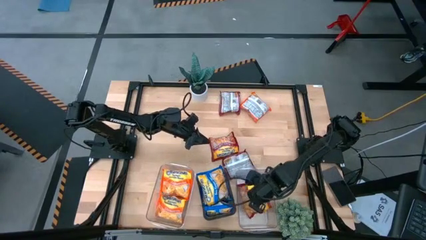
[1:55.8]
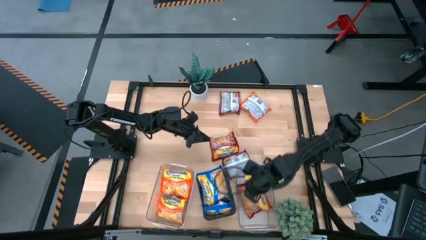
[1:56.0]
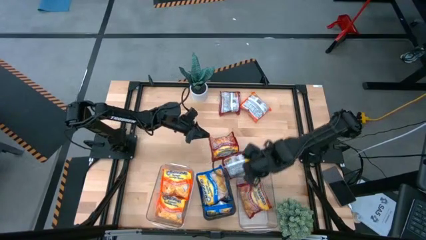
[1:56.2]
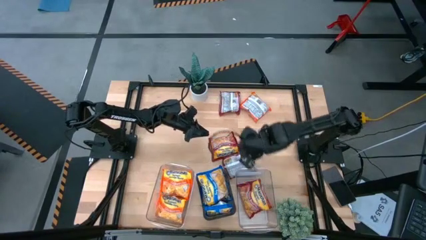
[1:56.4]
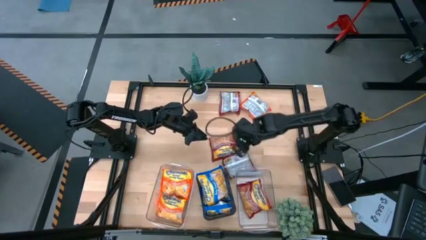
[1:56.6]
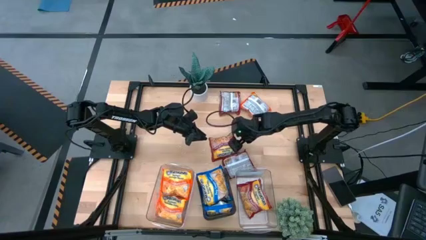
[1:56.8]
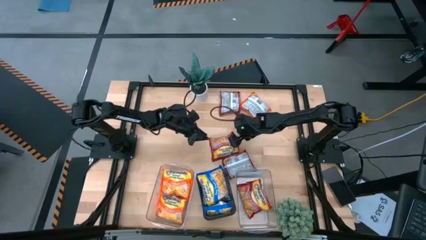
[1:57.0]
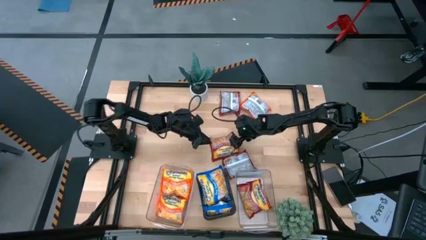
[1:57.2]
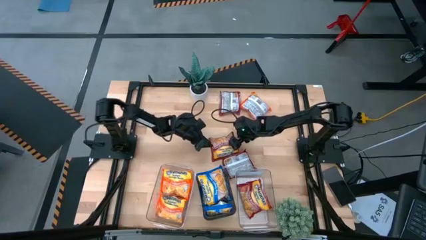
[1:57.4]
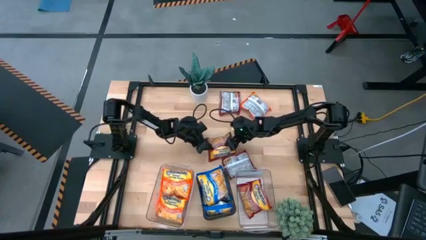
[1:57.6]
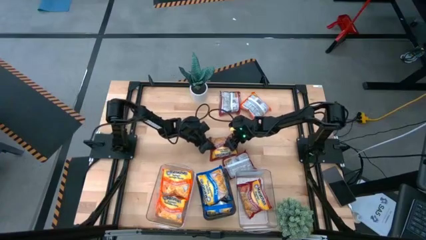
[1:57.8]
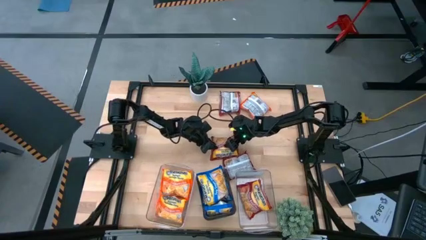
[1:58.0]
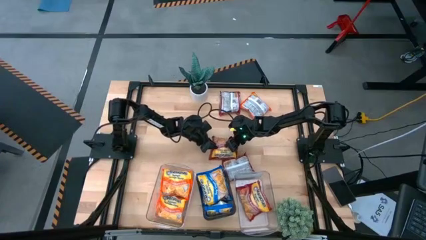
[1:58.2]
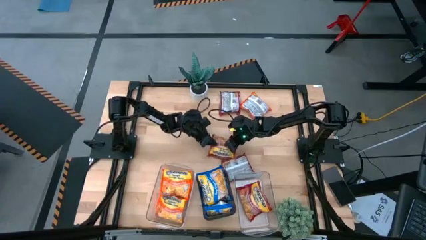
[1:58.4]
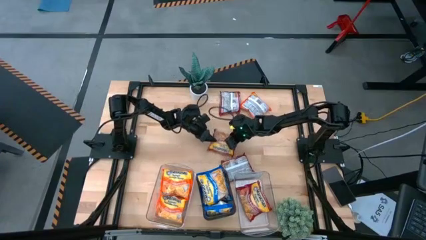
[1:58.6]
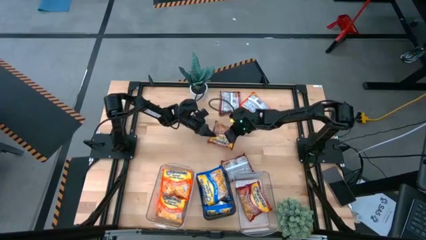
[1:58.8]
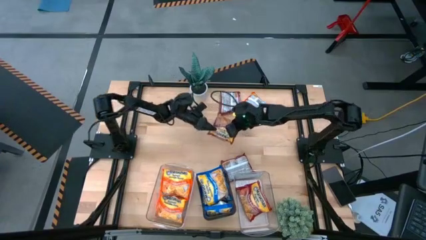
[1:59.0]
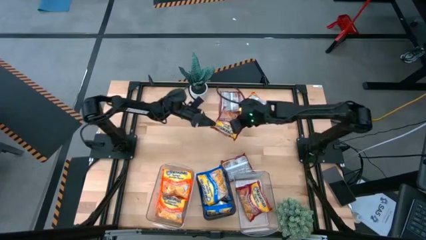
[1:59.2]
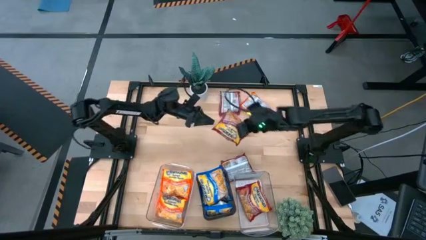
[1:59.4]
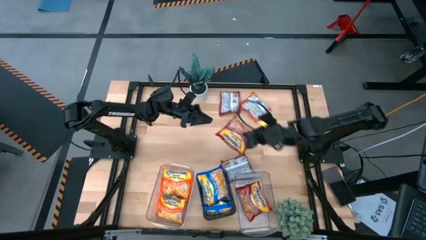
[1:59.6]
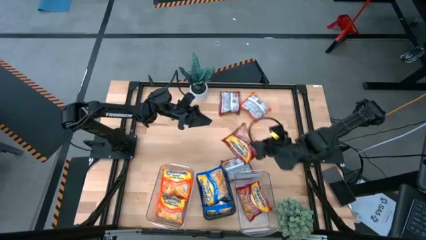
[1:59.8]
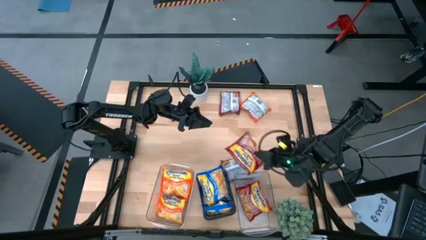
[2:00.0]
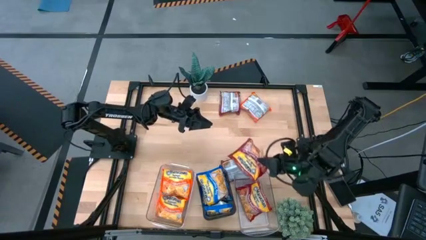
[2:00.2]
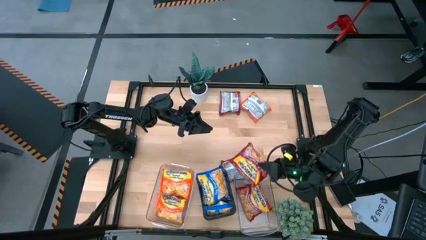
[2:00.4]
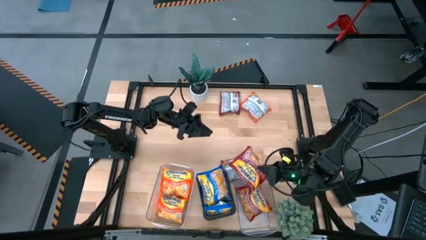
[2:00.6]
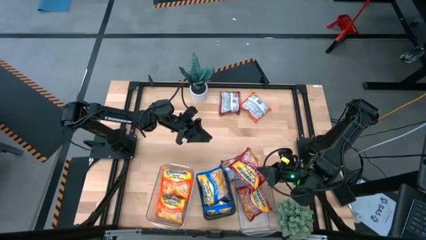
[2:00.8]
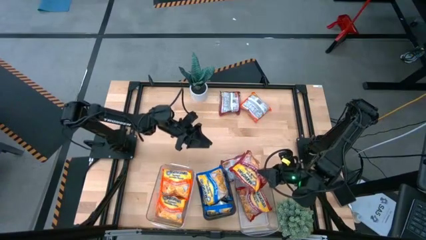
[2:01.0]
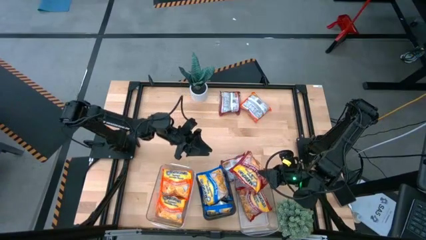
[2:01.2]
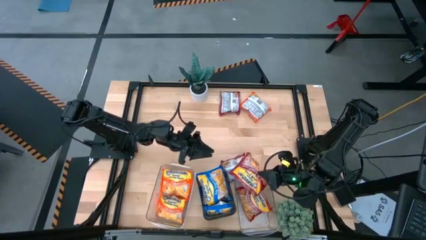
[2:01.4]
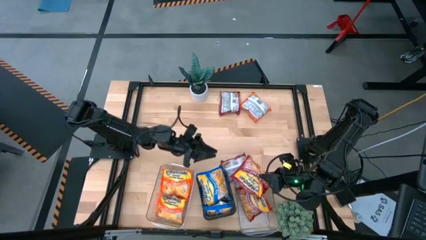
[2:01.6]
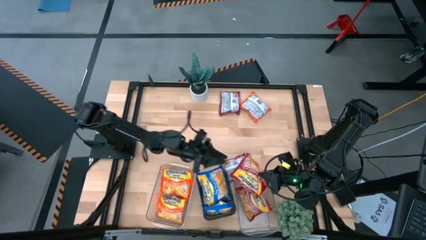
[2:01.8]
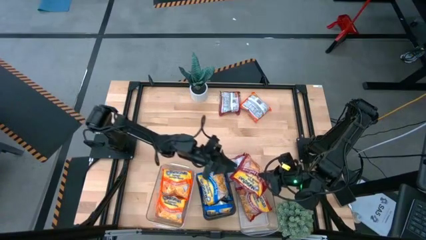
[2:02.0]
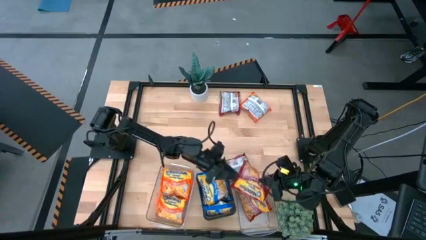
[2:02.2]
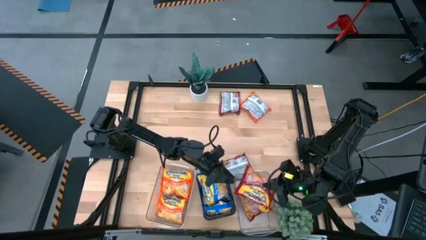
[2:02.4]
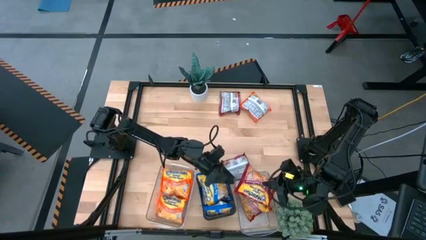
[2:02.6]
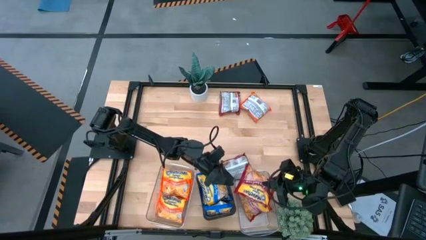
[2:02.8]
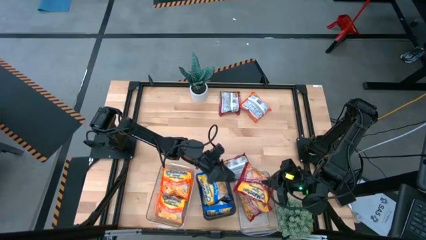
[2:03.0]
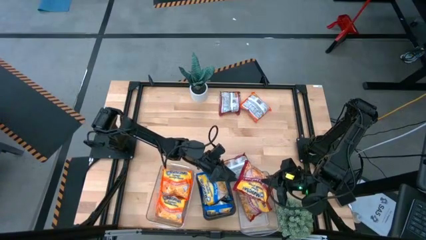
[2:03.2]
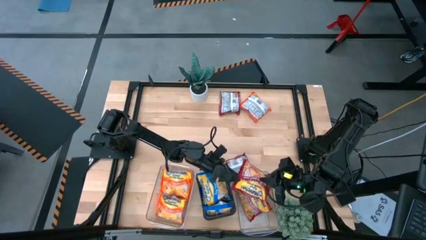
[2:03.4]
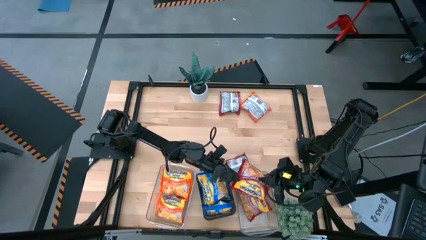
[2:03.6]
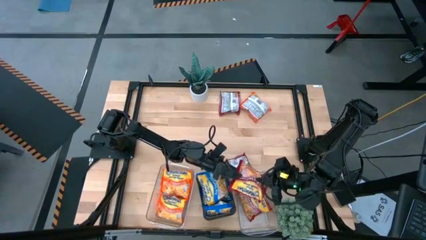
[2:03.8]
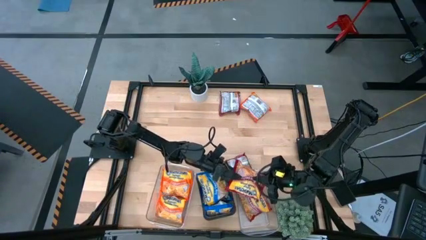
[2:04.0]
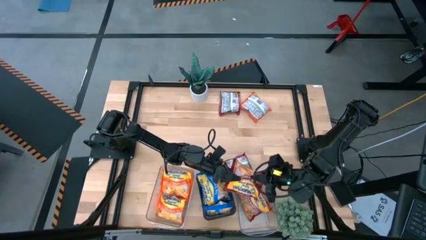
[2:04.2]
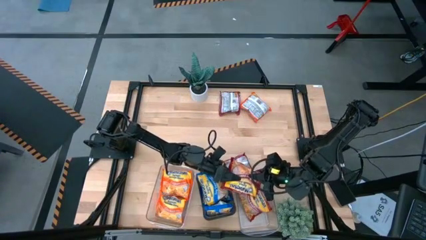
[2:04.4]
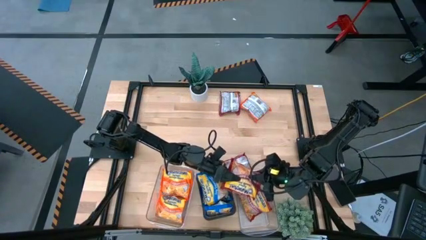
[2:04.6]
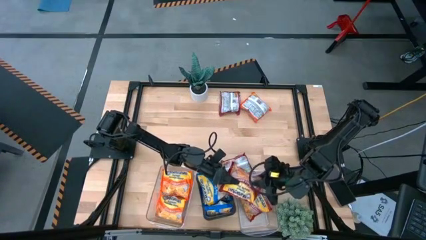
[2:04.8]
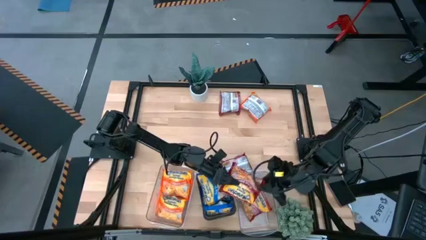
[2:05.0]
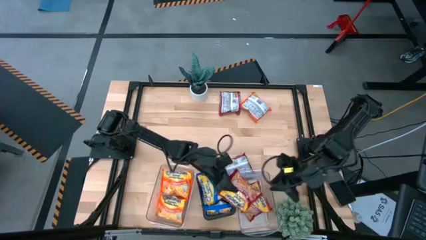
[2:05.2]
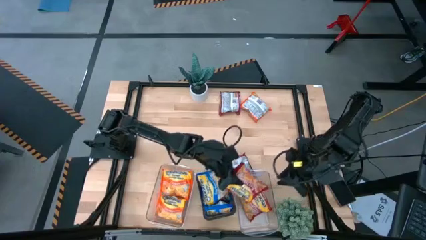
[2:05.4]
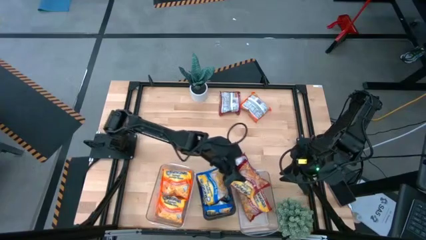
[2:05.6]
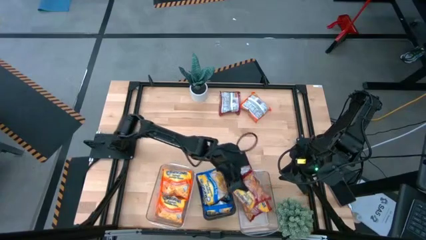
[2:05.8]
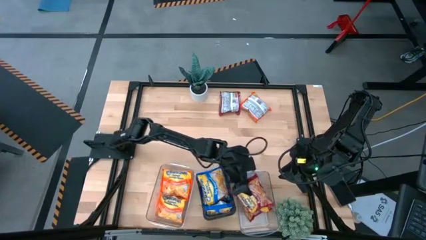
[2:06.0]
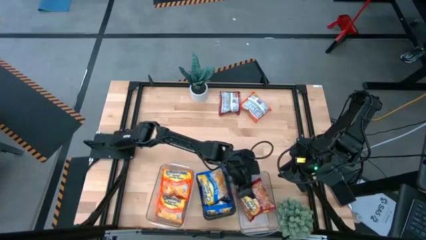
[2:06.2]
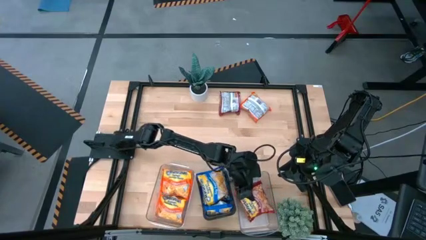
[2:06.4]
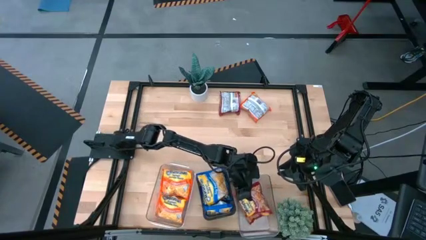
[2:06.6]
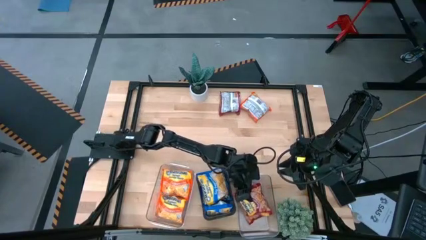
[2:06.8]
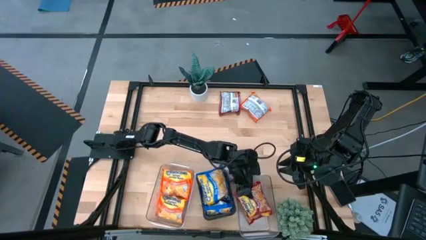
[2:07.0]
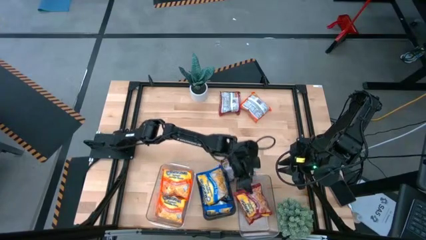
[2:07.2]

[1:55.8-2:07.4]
Task: Sort Maruchan noodles
Put the red noodle pack into the right transparent bin

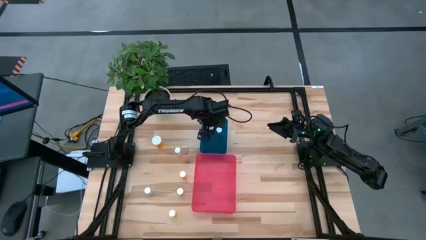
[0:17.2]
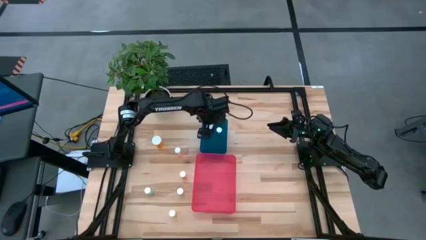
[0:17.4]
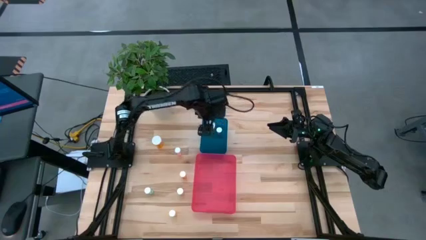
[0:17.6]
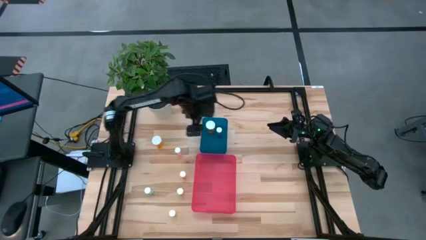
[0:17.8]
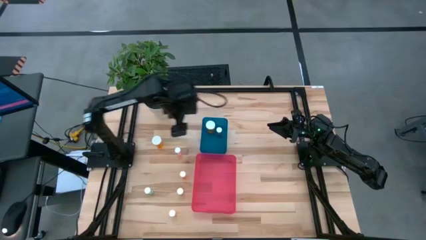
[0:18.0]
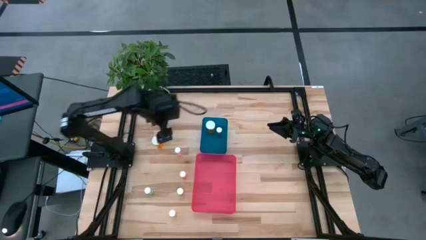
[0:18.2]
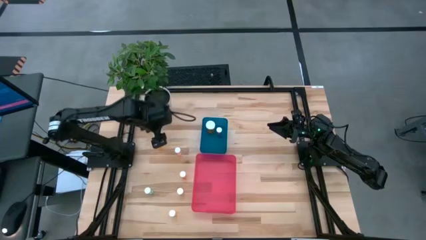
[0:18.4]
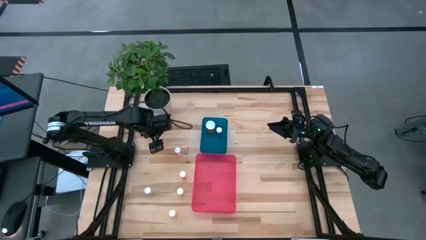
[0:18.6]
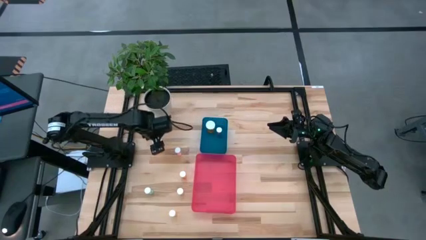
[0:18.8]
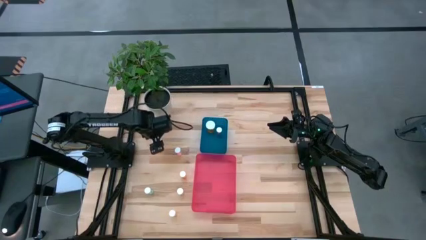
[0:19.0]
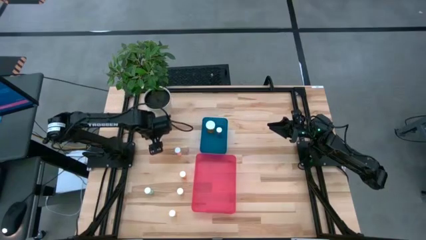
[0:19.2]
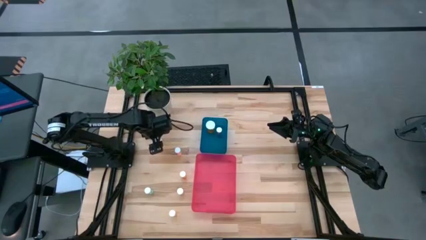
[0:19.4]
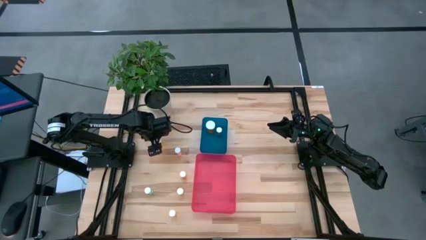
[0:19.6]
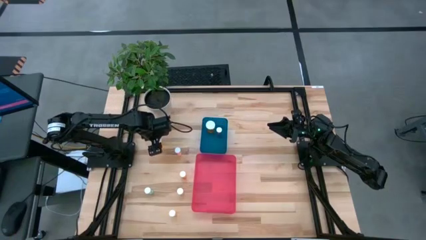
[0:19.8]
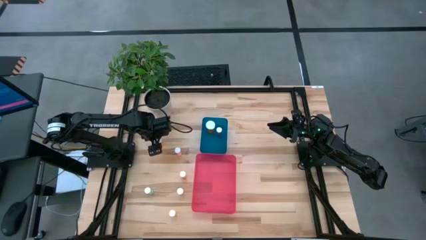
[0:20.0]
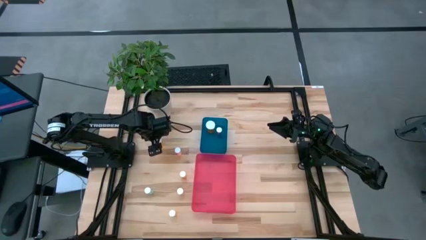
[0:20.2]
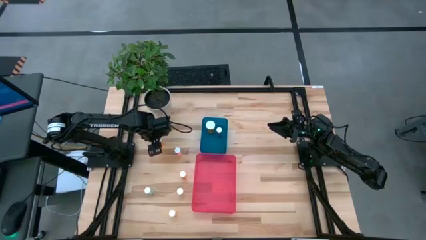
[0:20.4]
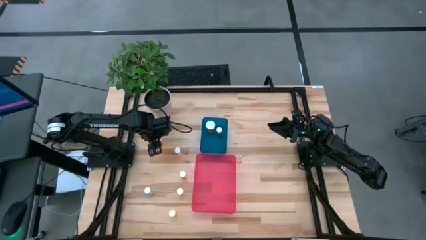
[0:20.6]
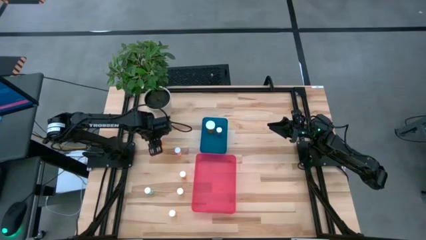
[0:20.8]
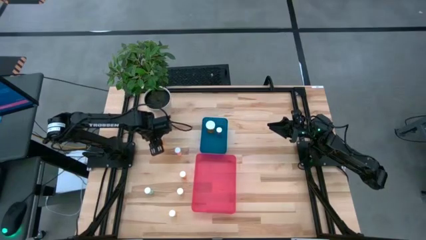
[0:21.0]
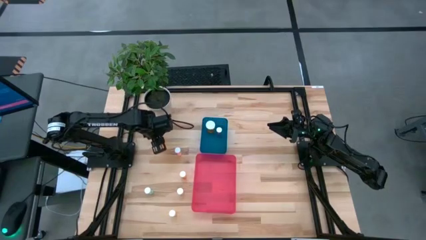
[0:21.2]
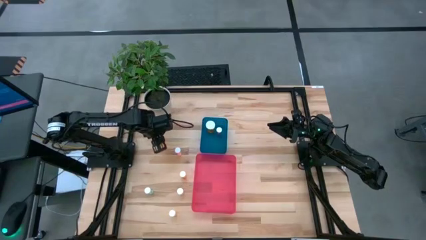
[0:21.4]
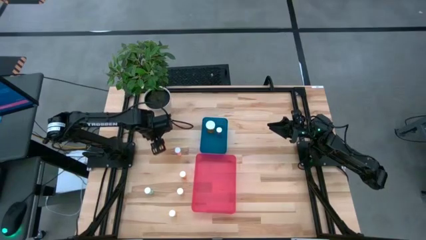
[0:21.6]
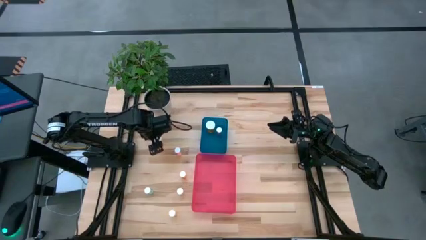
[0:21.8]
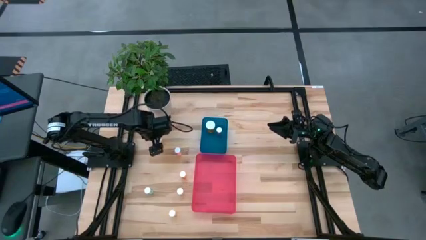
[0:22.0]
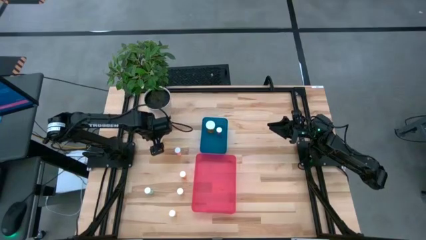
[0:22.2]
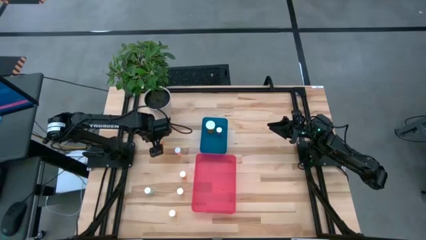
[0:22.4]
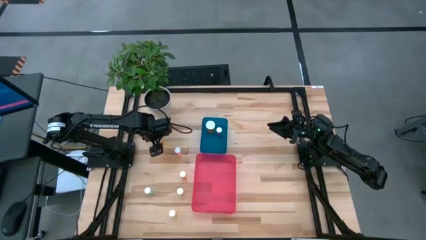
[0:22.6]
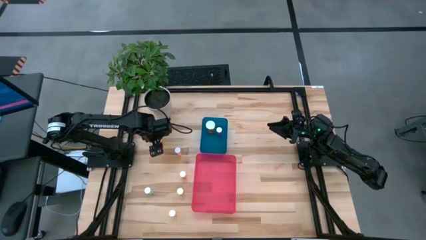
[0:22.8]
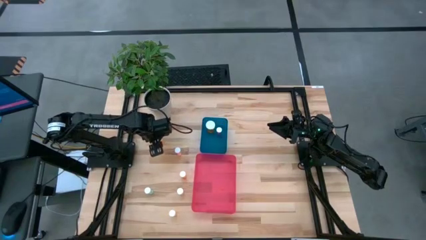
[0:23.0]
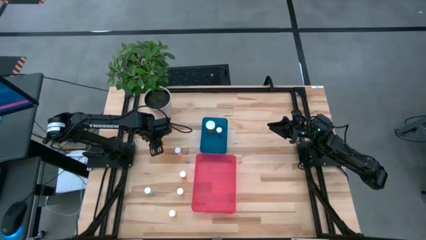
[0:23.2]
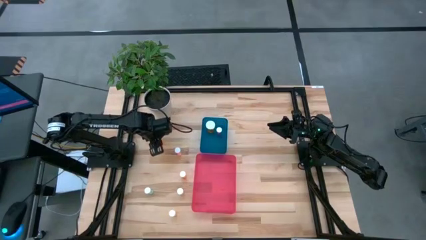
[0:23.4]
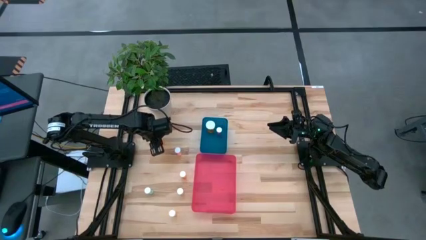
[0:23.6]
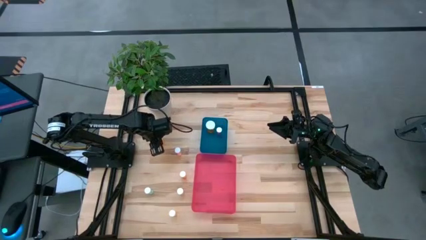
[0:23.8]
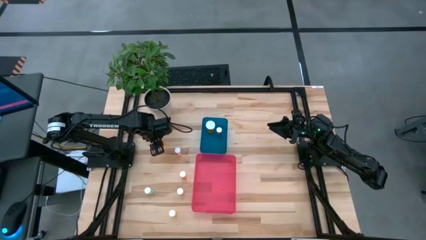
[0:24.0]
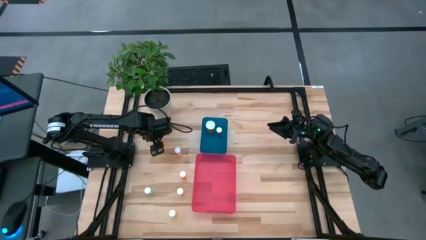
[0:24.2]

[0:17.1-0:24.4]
Task: Pick and place medicine bottles into bin by pill shape (circle, oval)
Put the large orange capsule bottle into the blue bin
